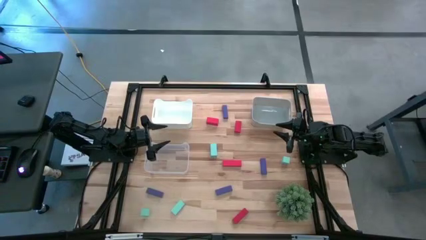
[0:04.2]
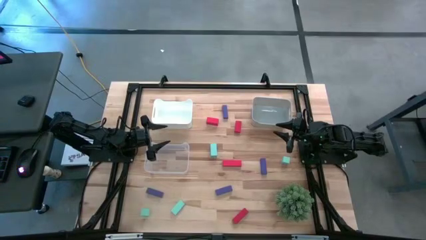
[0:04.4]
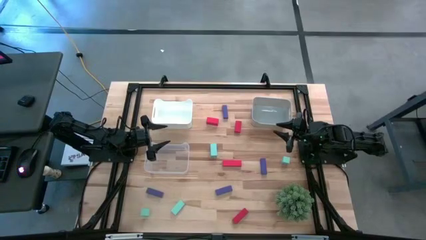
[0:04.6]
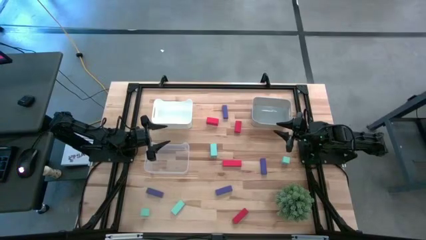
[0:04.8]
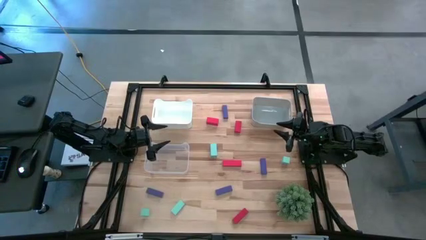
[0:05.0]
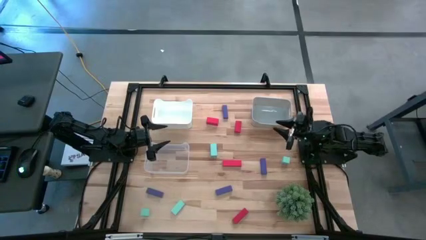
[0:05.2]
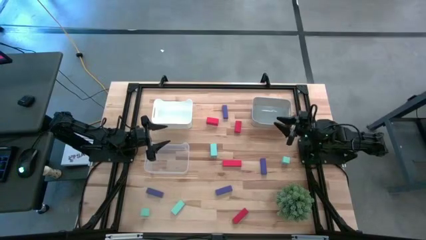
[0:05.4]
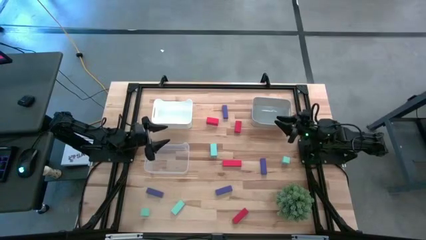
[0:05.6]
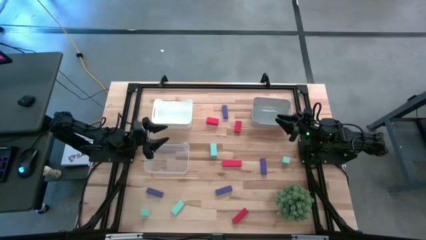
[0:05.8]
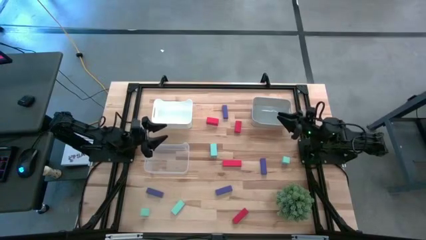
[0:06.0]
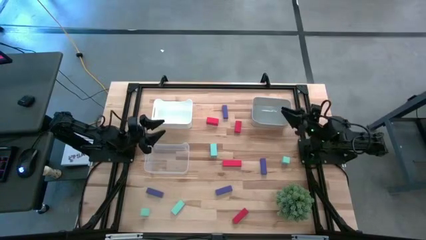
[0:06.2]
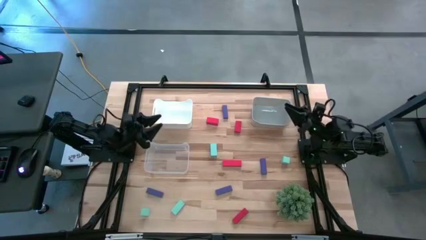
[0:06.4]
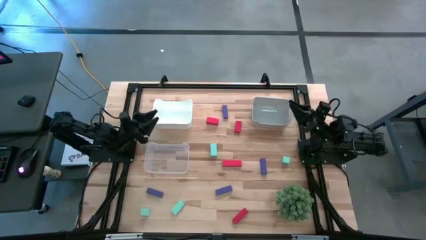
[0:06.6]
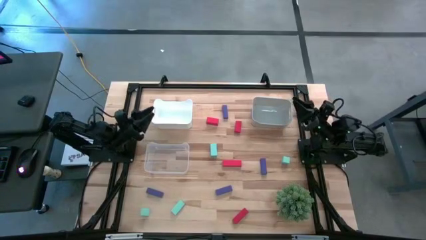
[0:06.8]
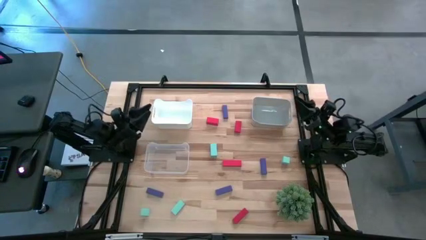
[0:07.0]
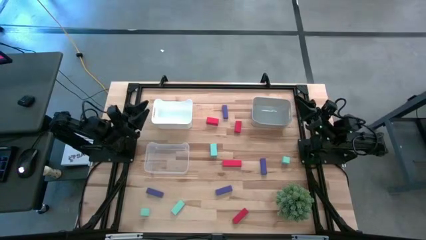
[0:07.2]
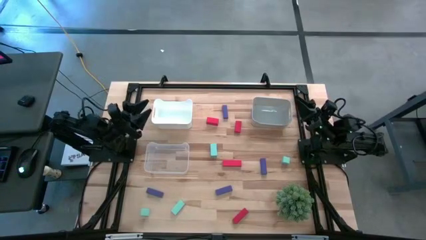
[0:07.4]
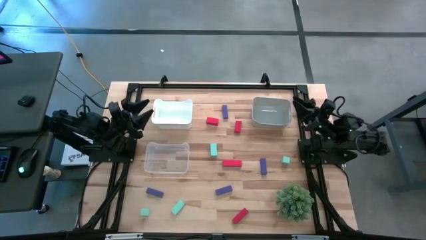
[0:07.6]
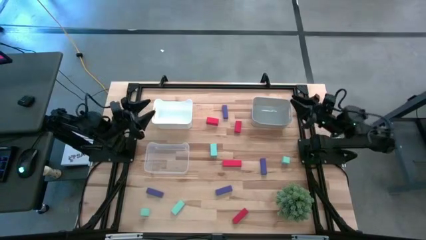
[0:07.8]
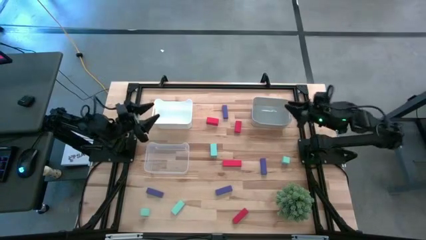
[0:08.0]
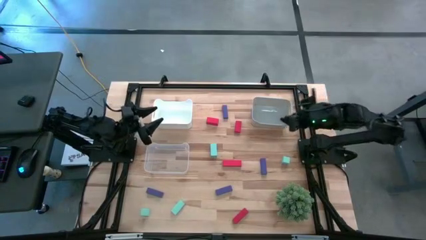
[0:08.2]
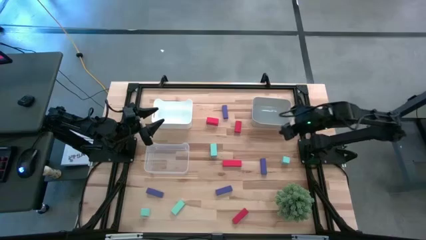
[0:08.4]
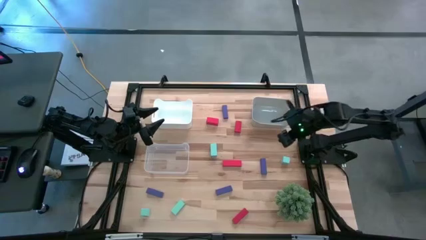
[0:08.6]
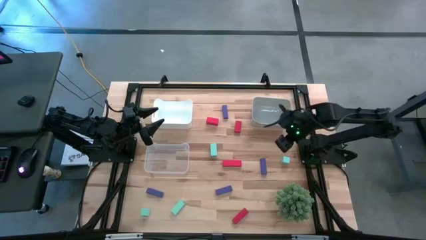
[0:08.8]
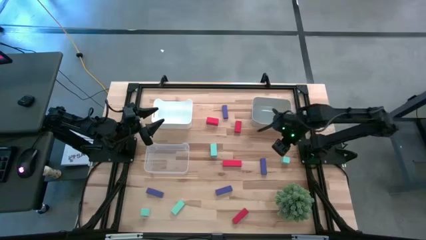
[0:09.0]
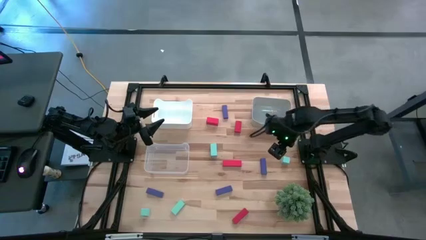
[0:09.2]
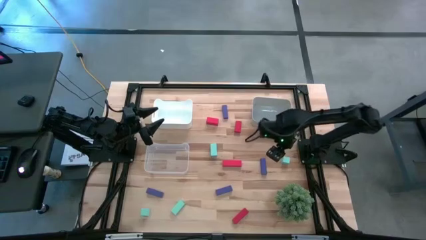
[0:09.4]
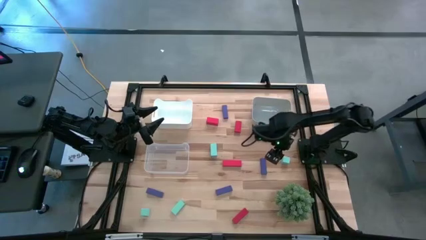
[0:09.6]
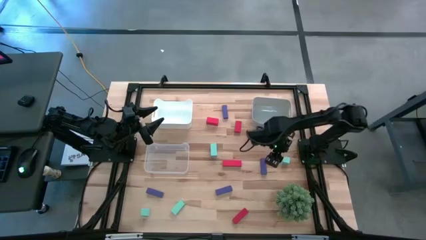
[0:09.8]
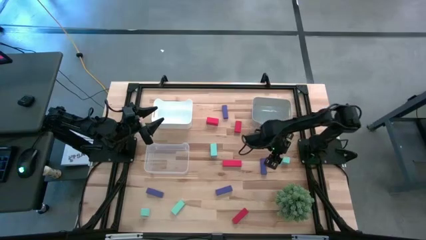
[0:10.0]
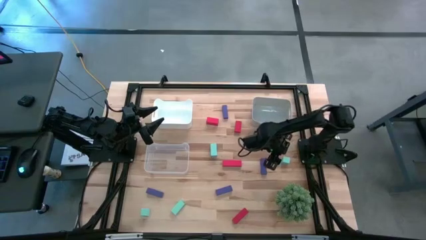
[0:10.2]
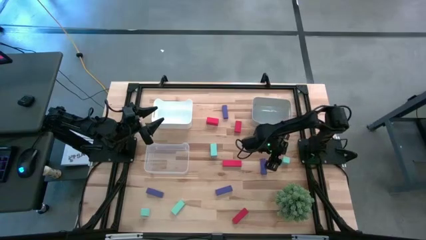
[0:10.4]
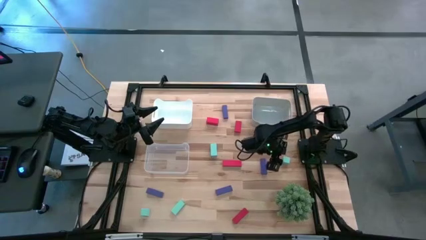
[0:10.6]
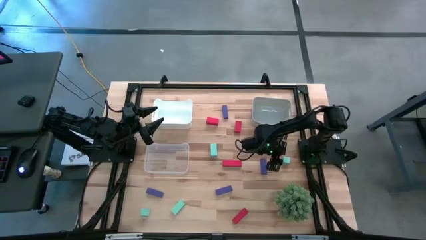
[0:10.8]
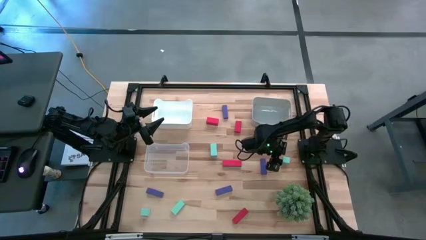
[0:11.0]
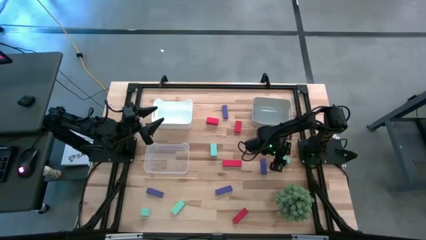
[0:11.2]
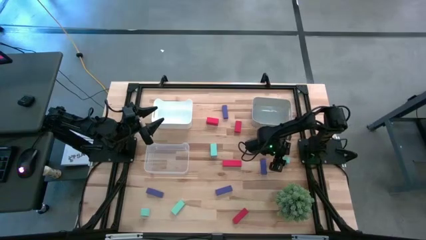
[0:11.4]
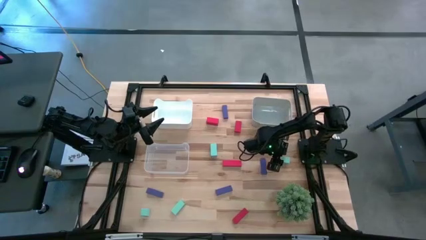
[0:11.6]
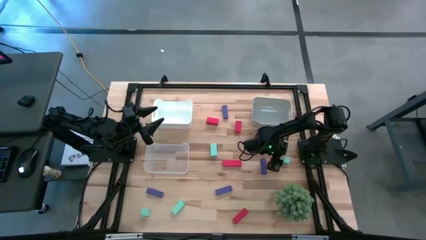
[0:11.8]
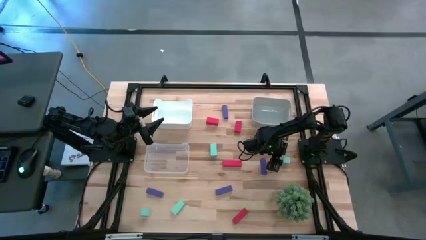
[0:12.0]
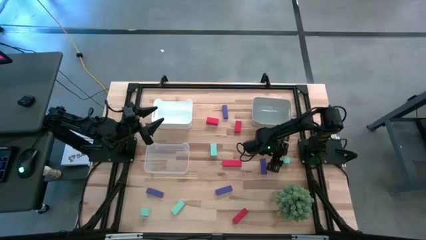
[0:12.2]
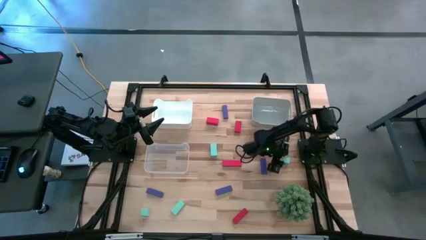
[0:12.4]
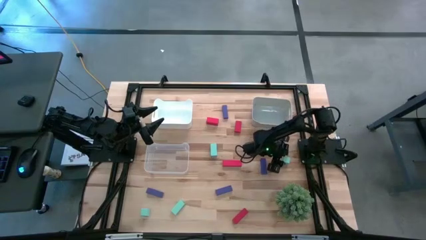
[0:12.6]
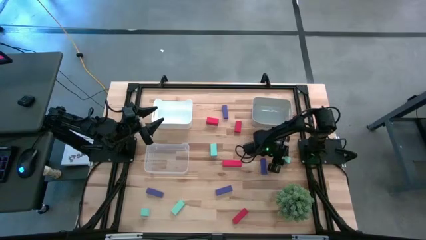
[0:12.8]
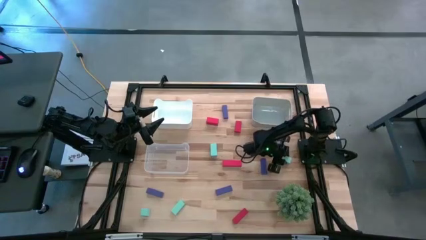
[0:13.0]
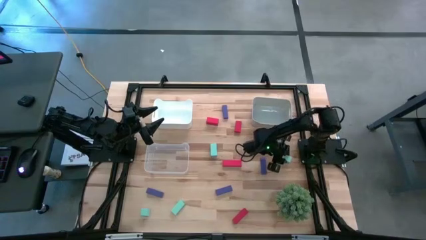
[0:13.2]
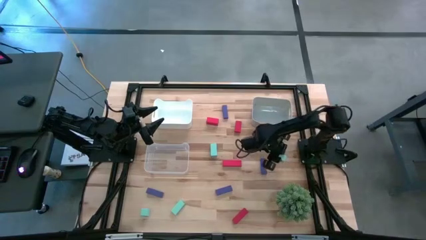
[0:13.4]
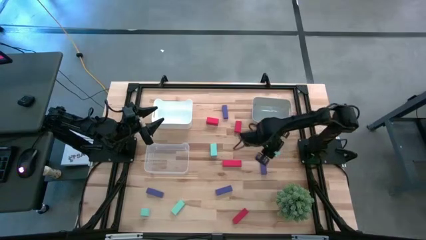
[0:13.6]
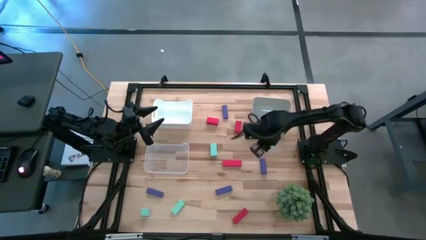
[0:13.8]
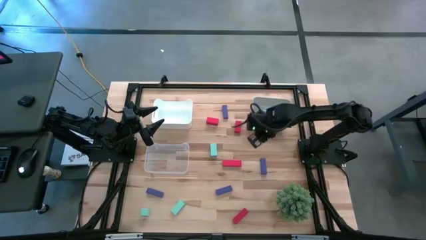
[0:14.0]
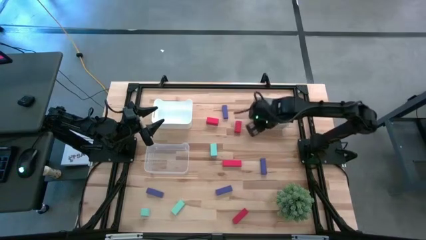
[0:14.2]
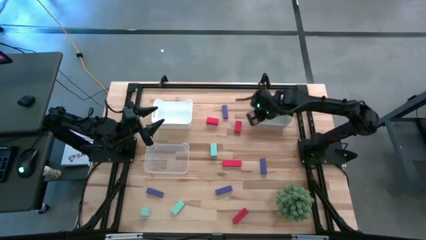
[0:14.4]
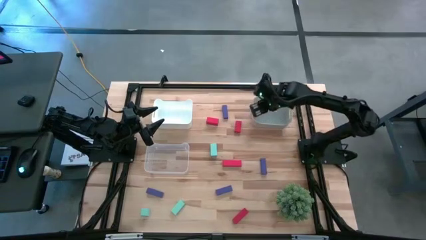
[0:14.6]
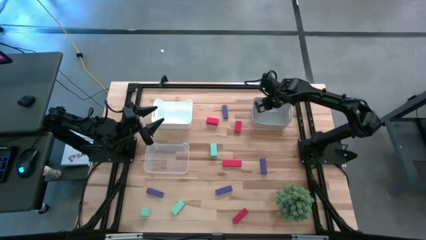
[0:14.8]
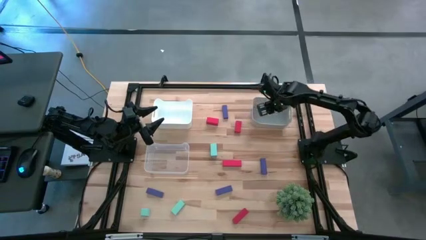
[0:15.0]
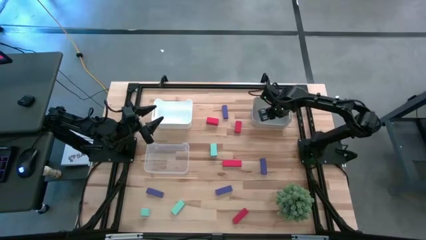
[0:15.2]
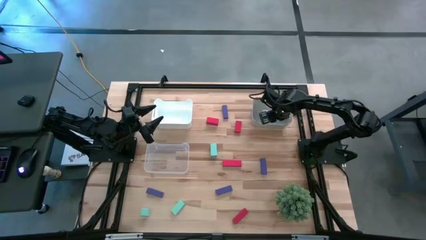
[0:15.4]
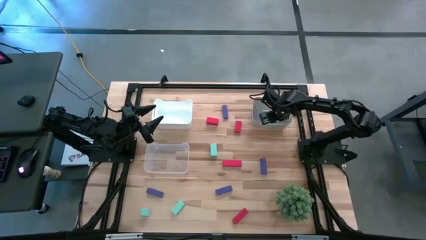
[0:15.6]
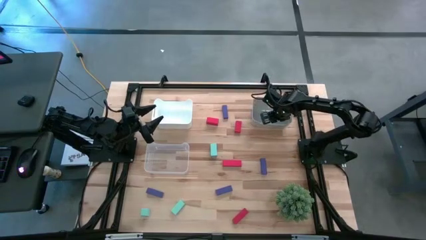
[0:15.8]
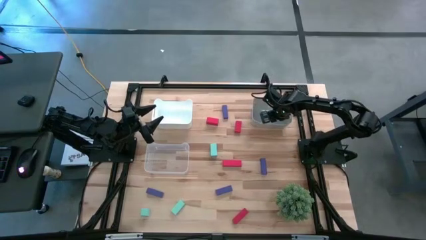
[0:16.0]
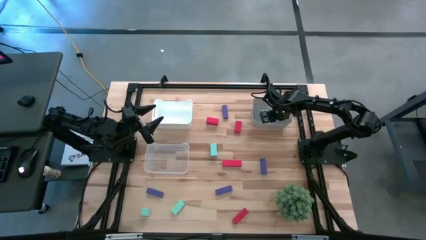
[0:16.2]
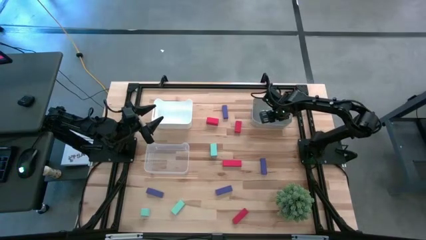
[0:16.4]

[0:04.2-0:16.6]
Task: Sort & place blocks by color
Put the light blue block into the grey bin
